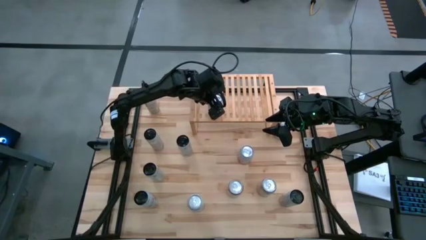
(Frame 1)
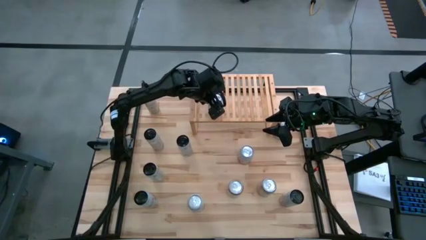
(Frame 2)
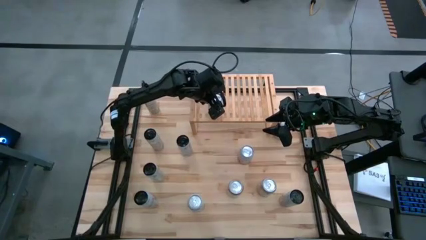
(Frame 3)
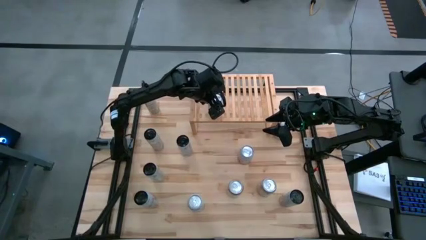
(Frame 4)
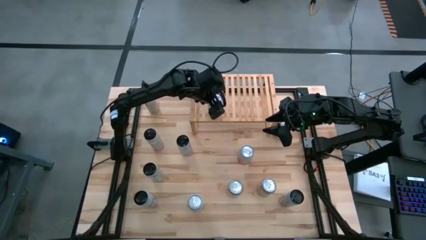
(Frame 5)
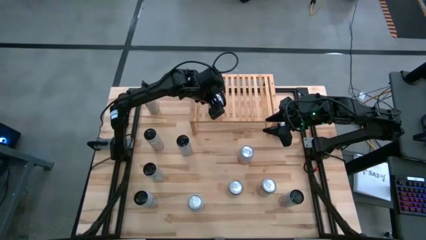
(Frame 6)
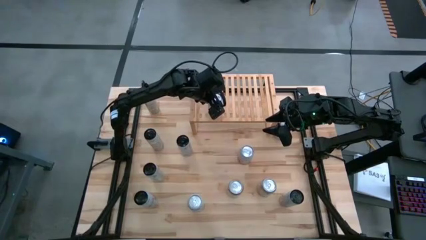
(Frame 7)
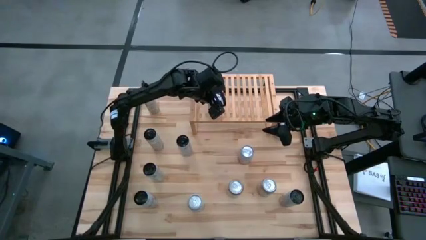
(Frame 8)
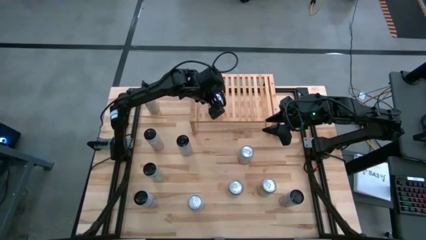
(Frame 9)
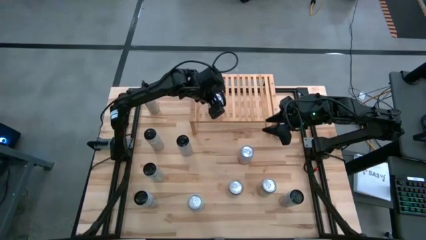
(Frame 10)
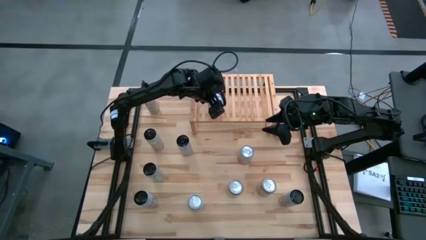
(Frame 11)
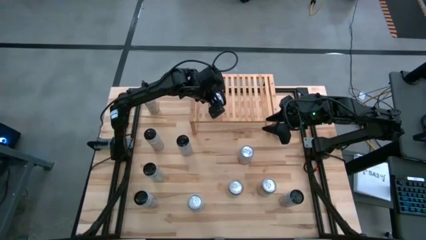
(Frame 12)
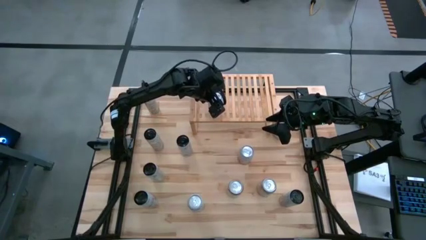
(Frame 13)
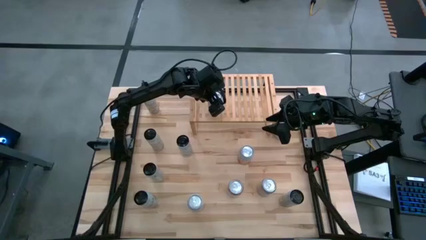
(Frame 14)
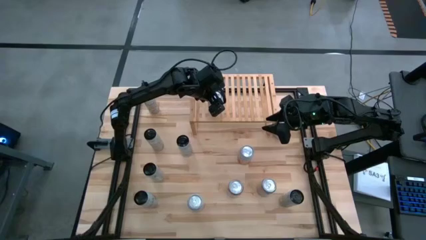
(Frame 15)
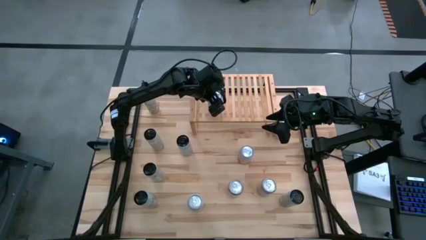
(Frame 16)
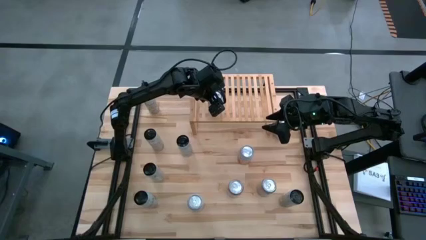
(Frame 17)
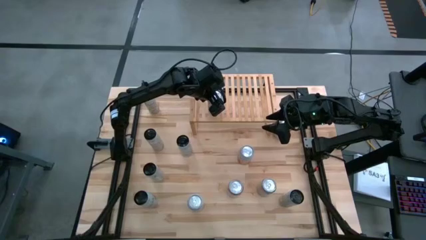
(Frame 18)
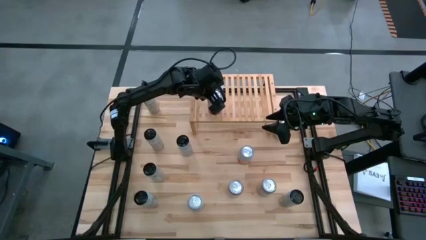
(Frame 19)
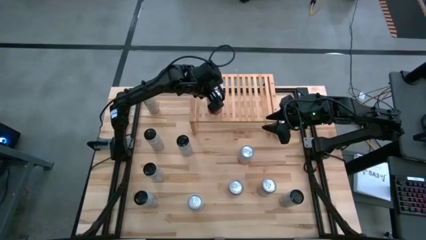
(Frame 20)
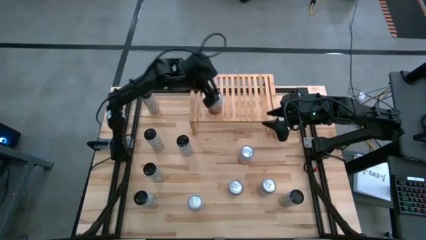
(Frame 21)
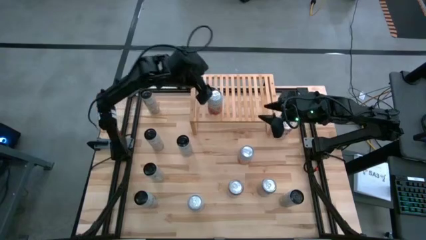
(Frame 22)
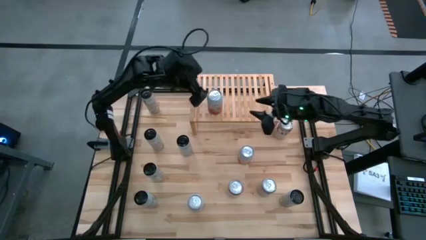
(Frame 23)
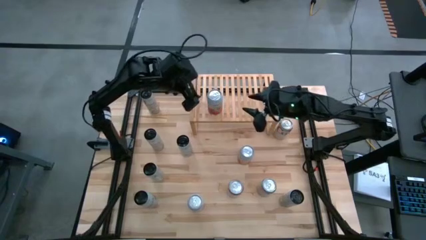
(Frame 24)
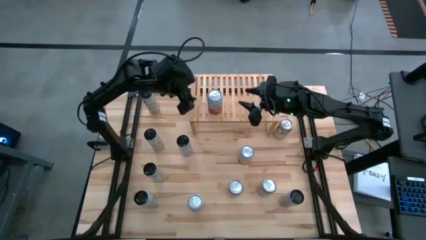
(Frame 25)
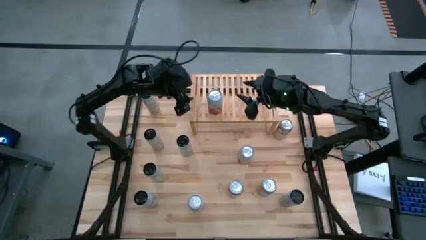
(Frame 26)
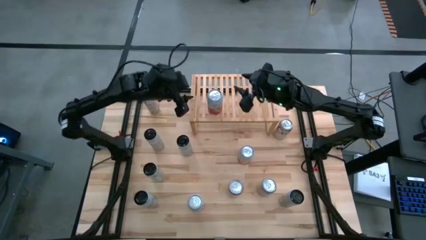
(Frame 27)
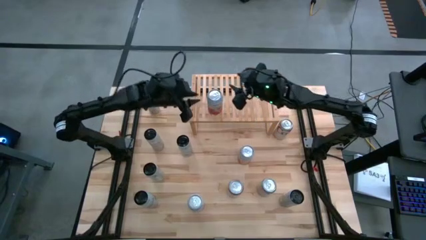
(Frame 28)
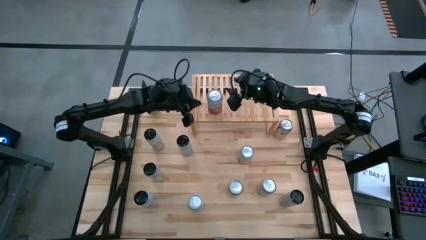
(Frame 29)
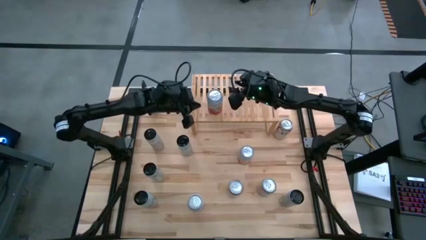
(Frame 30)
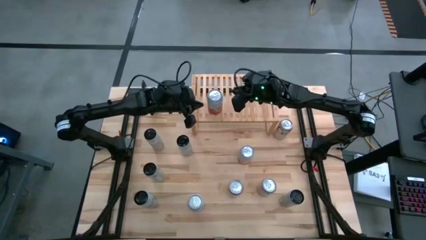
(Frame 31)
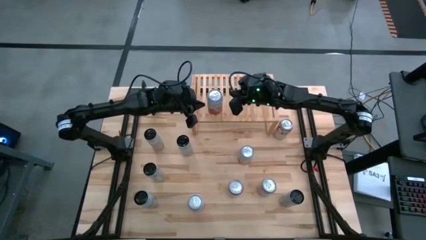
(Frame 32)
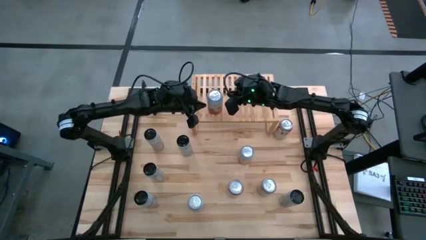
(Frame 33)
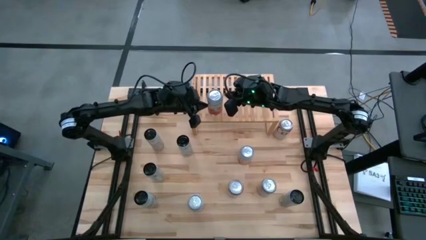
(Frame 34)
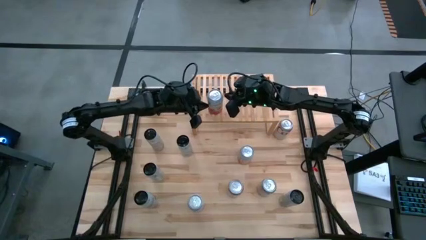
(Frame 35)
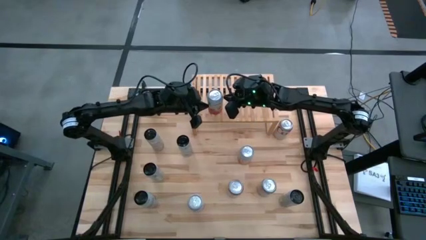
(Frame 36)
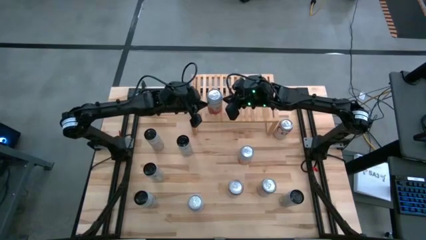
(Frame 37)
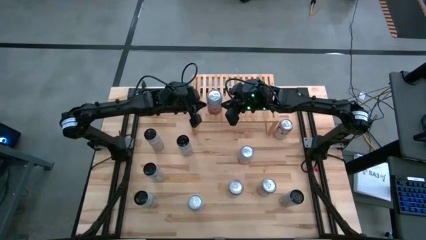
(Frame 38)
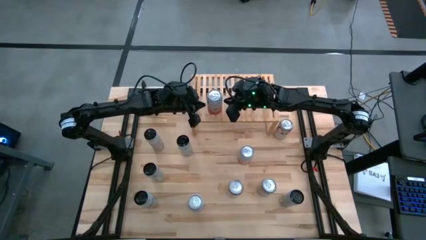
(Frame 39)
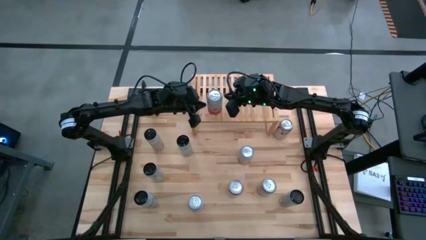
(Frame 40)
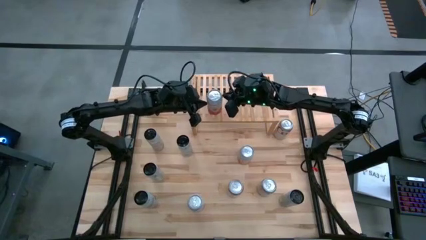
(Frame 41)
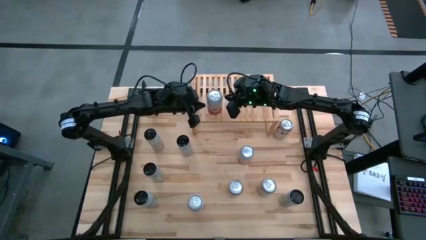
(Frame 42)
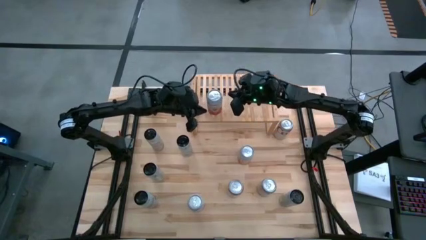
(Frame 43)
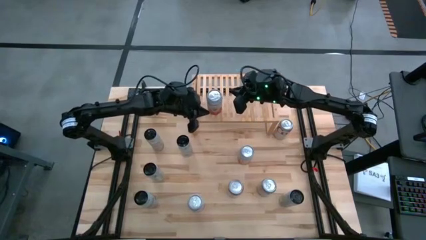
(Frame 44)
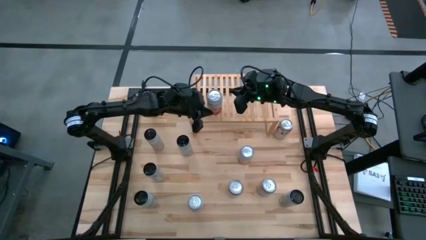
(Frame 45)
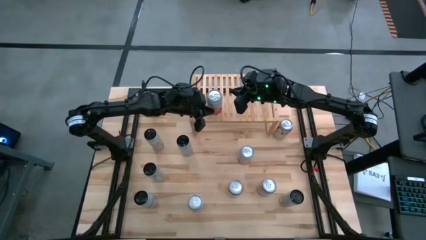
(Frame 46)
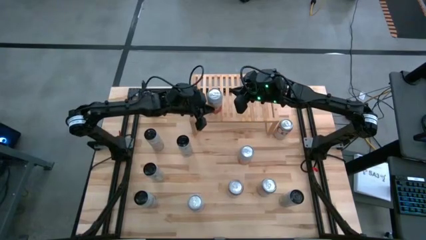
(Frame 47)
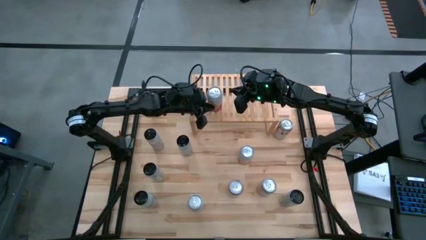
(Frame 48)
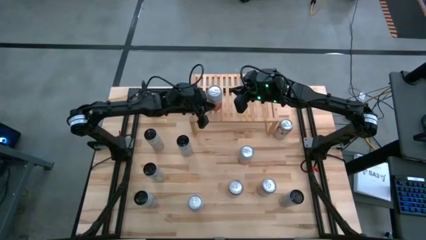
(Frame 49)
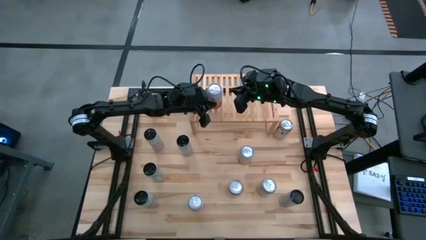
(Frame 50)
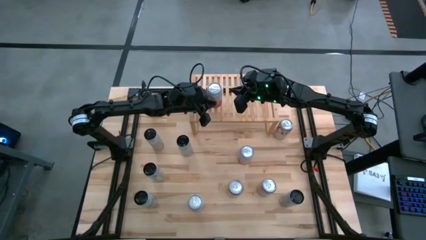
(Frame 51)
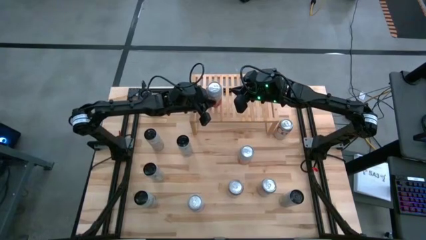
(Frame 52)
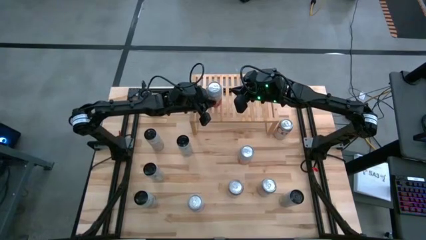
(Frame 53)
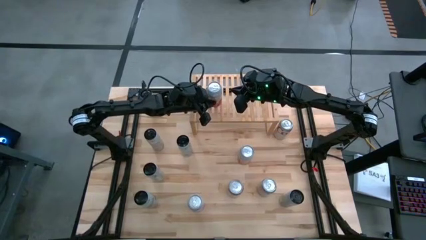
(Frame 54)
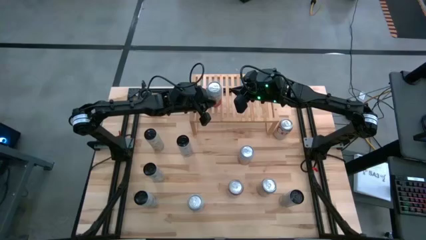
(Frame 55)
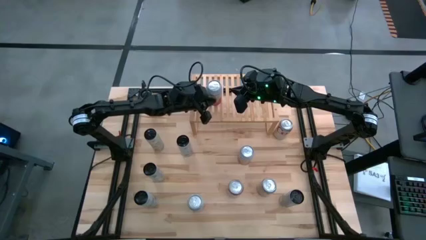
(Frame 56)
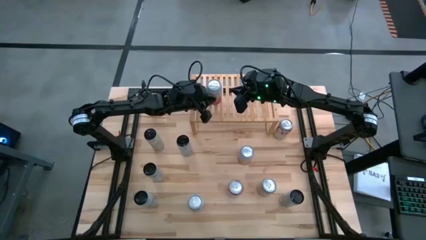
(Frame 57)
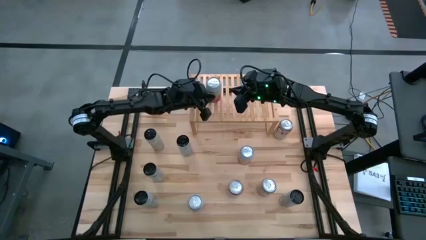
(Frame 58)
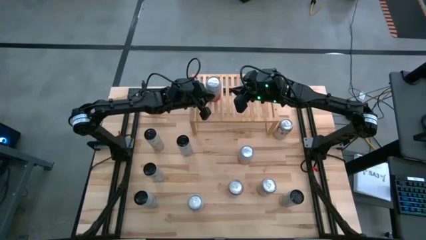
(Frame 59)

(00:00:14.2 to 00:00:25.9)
Task: Place canned beverage on shelf
Put the top pink and white soda can on the shelf
